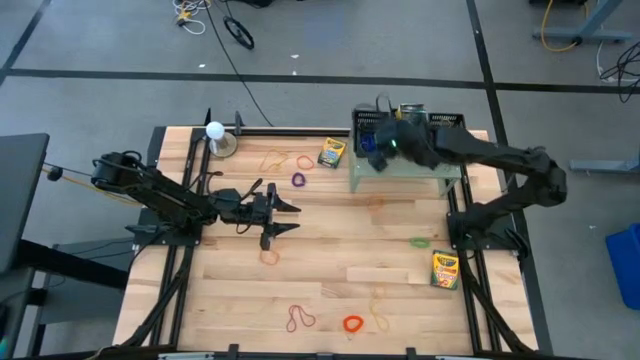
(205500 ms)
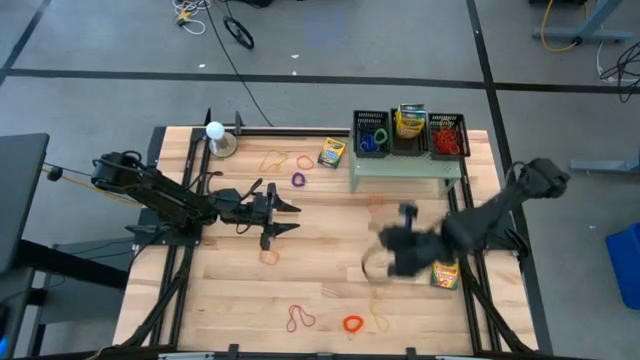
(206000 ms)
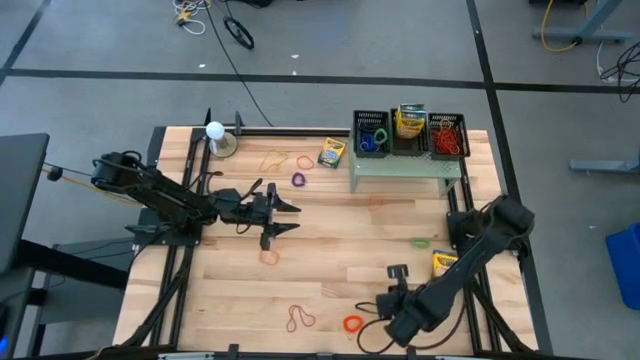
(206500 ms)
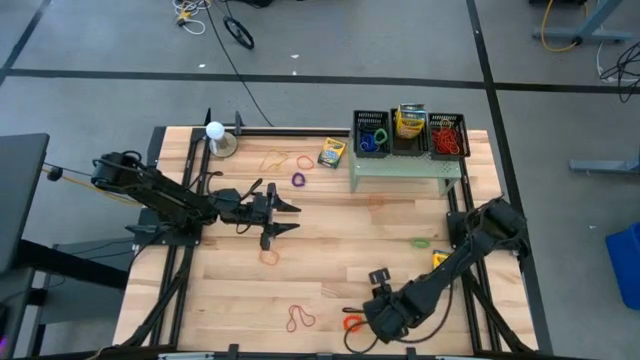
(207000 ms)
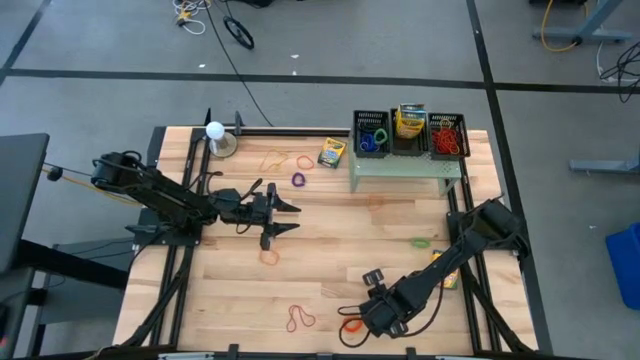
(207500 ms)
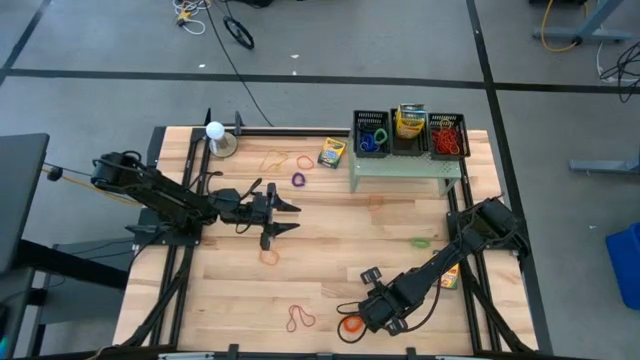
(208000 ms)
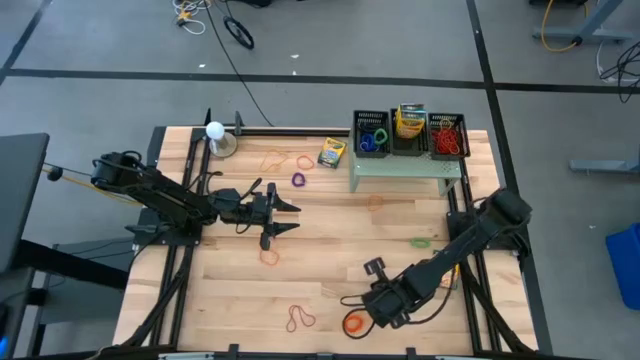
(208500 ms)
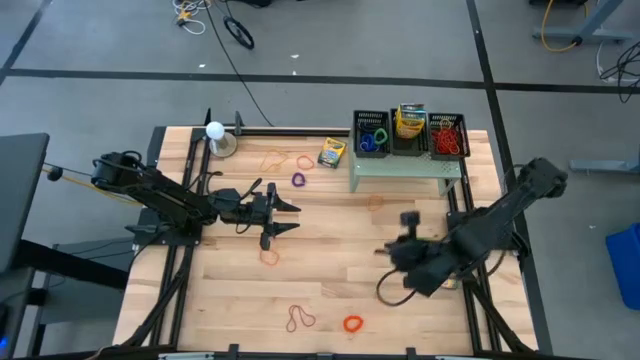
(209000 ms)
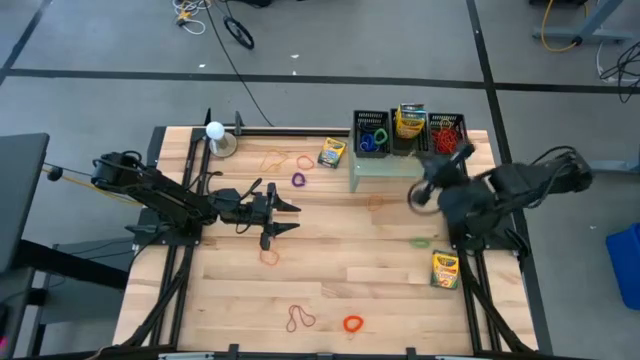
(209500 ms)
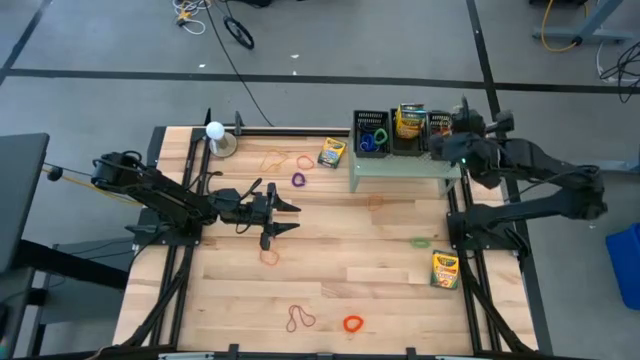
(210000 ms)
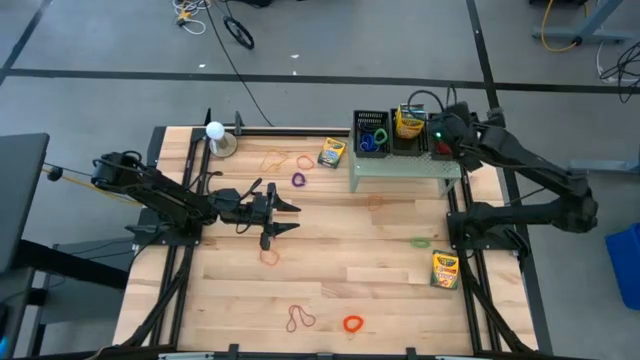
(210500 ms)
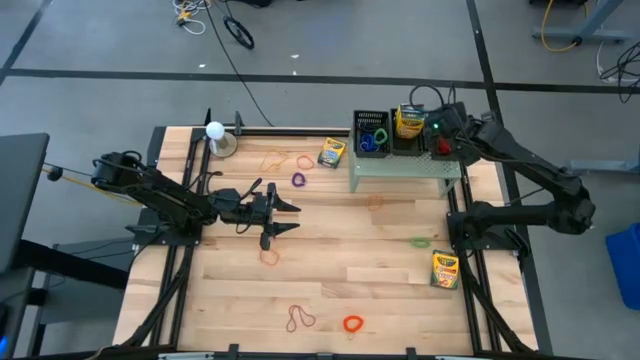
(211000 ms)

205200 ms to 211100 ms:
Task: Pick & Place Office Desk Supplies
Put the bottom yellow rubber band into the right black basket on the shelf

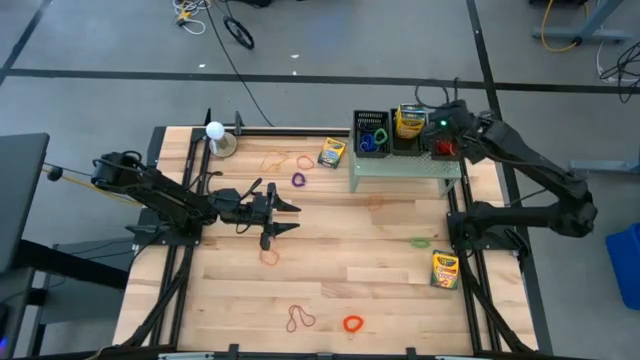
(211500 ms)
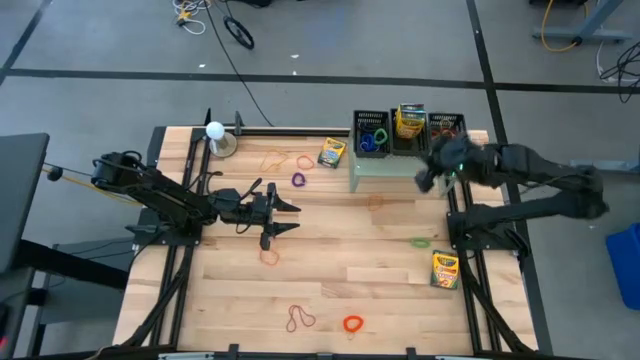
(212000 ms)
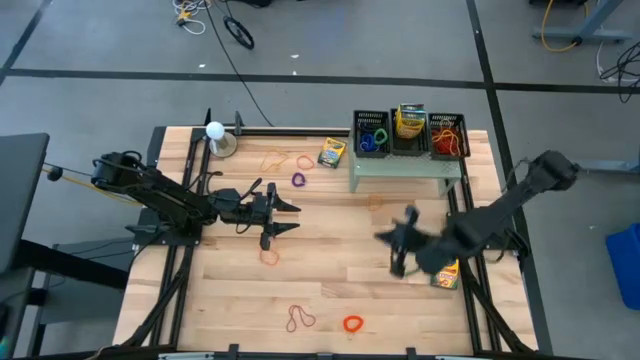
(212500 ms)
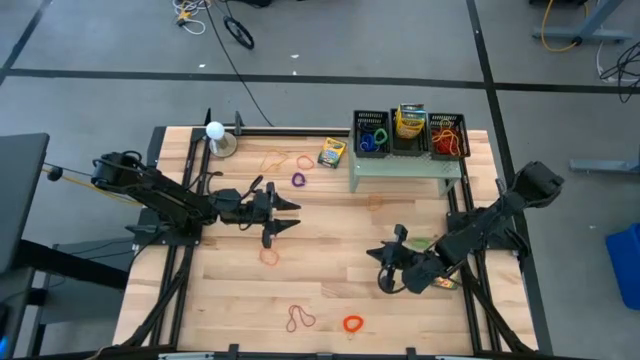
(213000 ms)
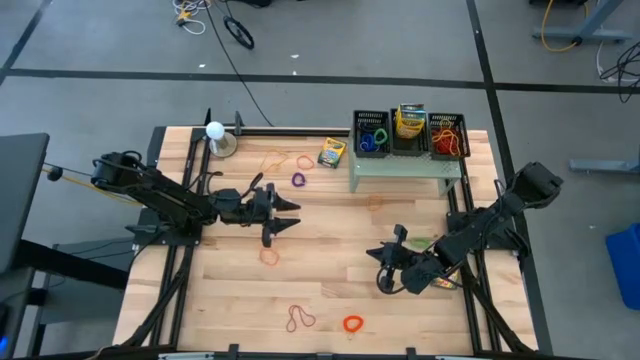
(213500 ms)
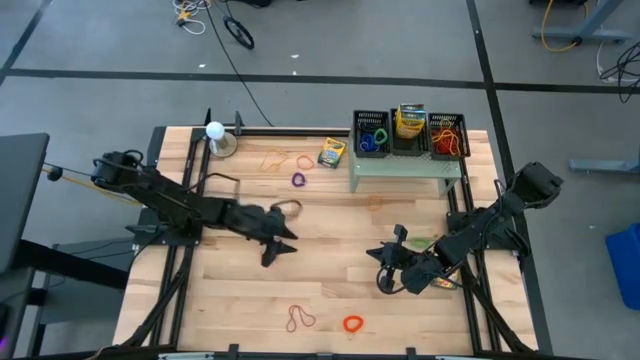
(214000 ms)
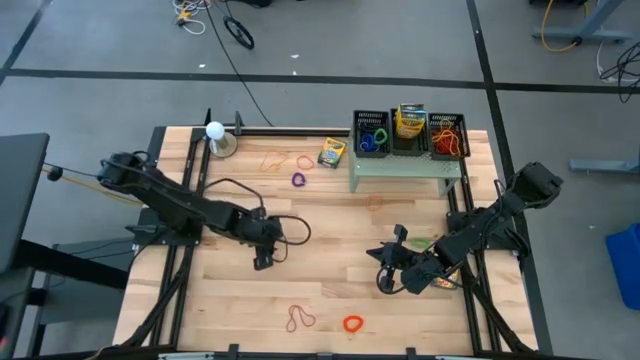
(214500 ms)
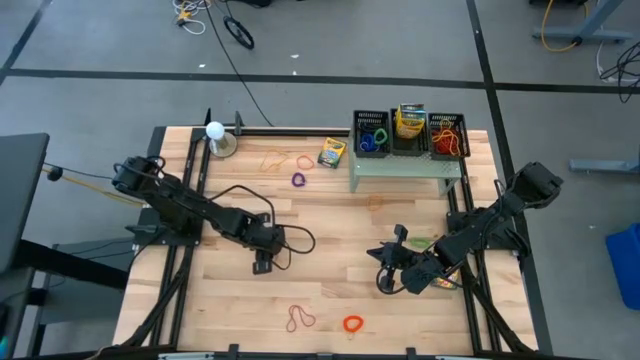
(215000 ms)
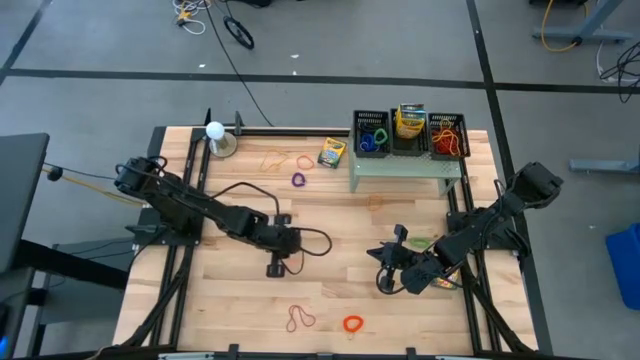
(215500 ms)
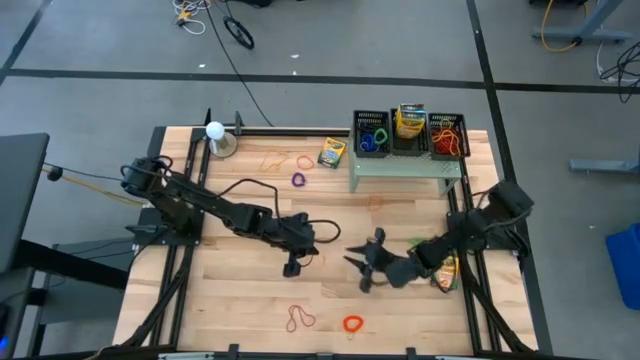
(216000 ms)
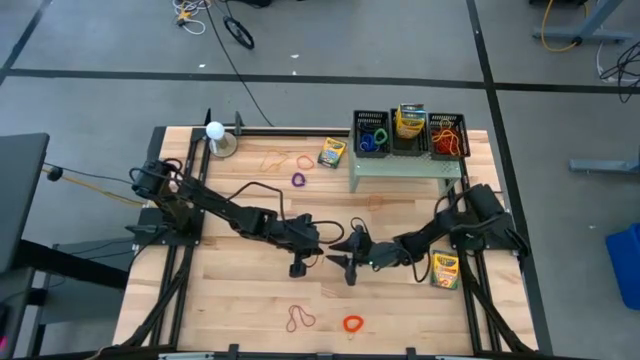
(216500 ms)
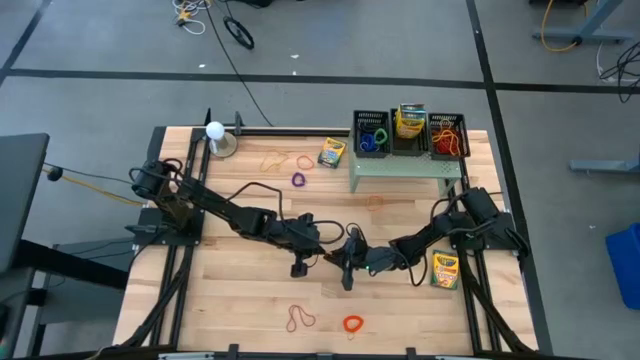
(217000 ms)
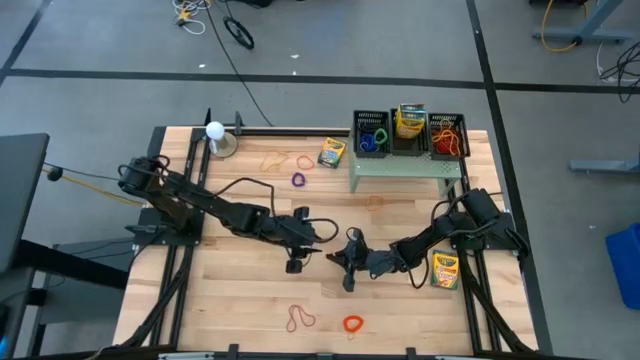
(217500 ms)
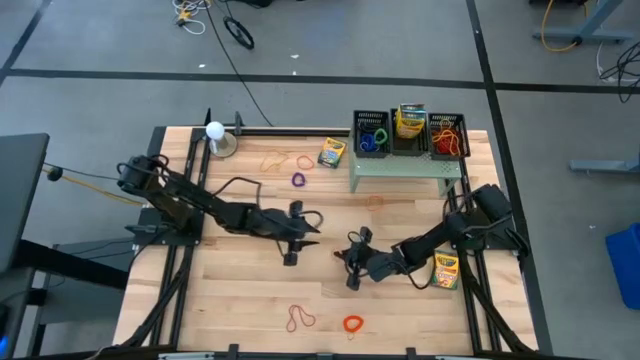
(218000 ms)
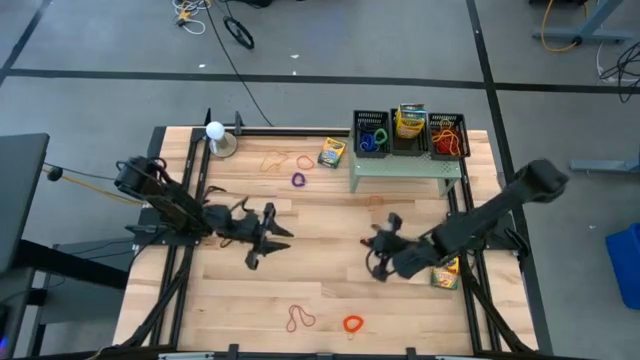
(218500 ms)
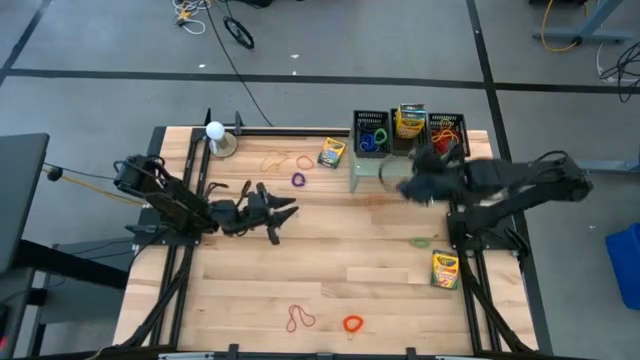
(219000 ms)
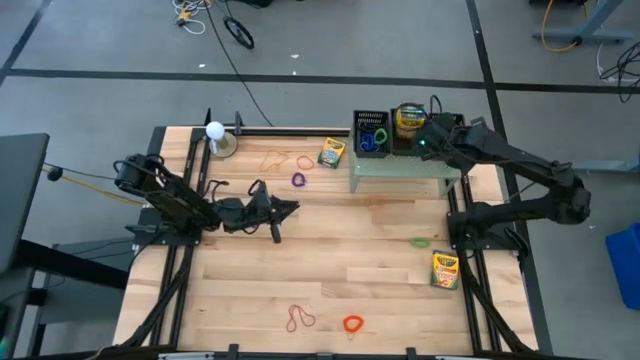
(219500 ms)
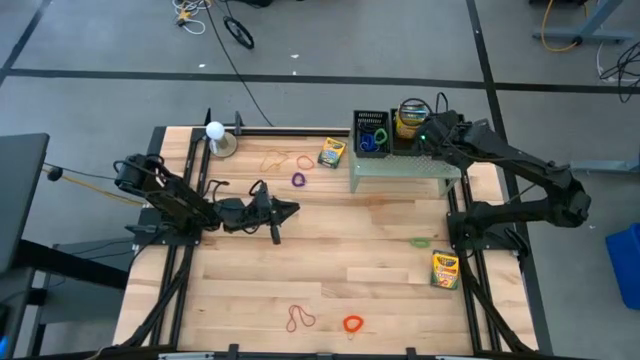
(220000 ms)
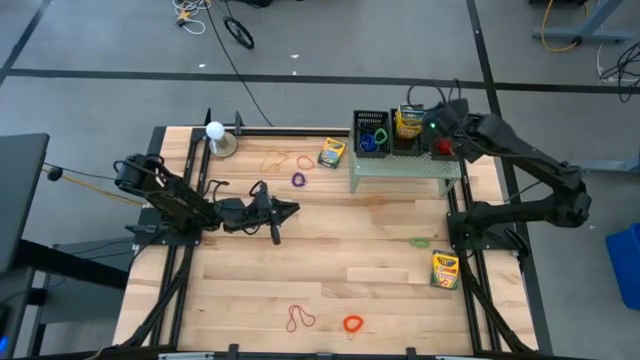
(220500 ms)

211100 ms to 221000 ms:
Put the bottom orange rubber band into the right black basket on the shelf

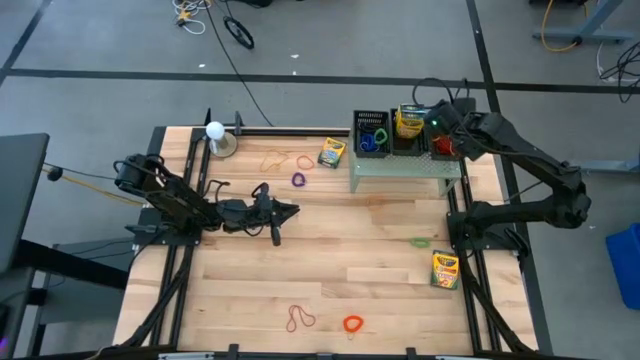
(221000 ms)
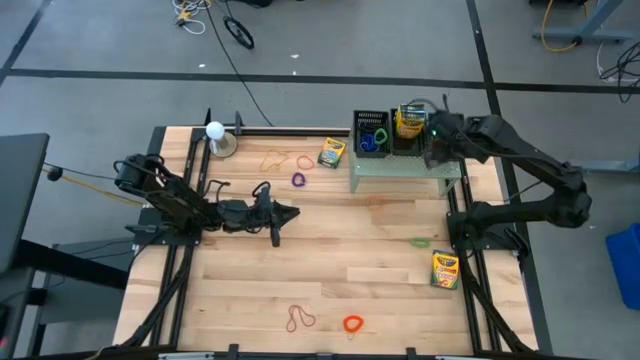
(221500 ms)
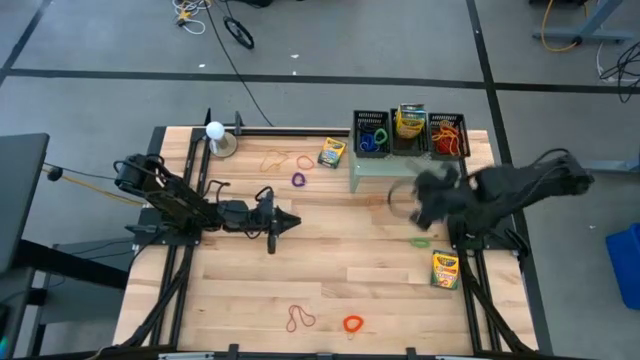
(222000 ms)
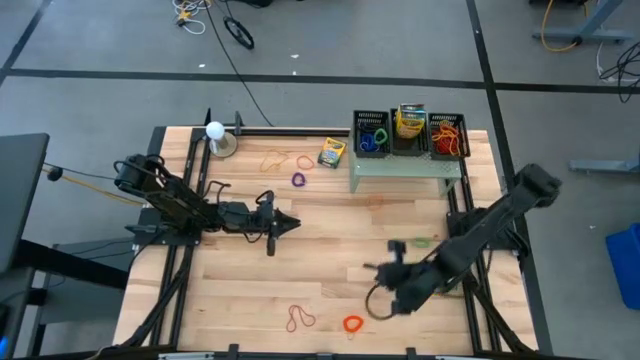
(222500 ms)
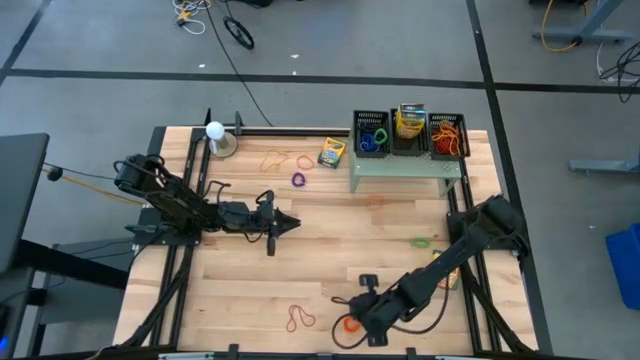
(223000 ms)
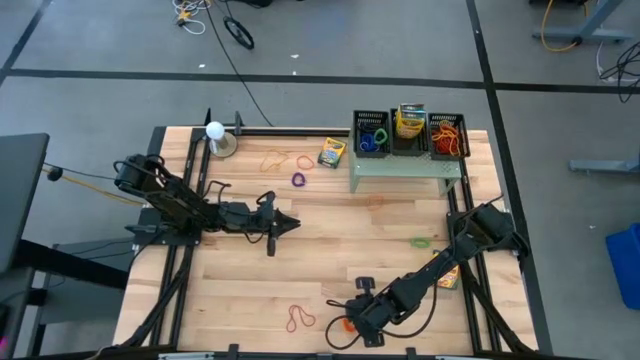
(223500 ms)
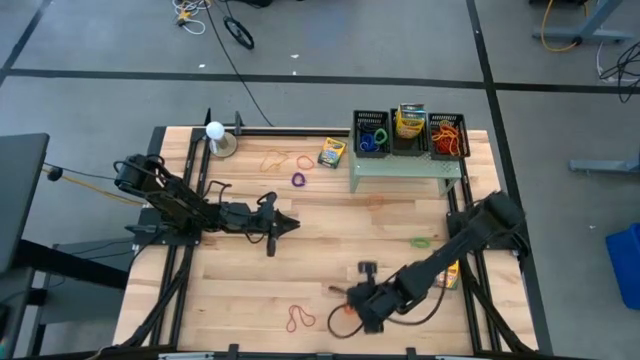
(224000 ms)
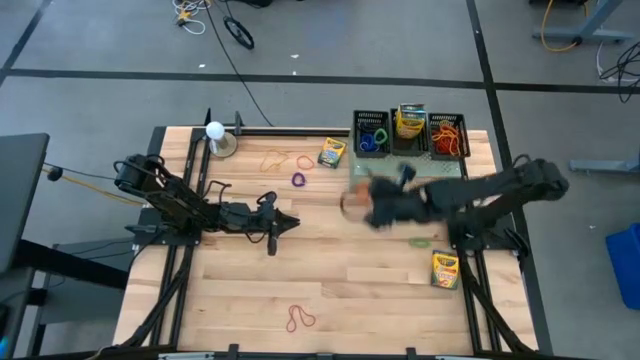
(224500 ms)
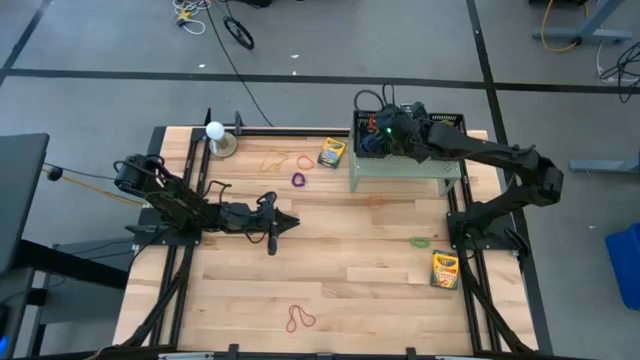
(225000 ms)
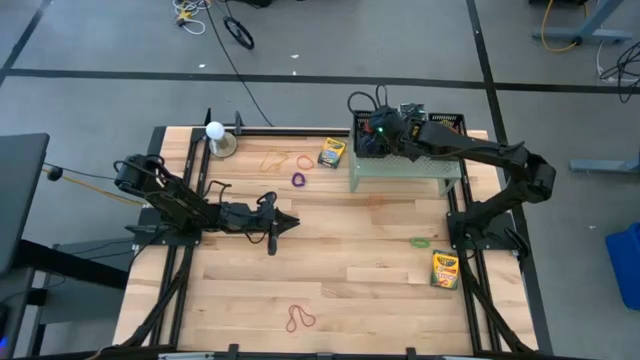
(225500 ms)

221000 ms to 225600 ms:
Put the orange spring keychain into the left black basket on the shelf

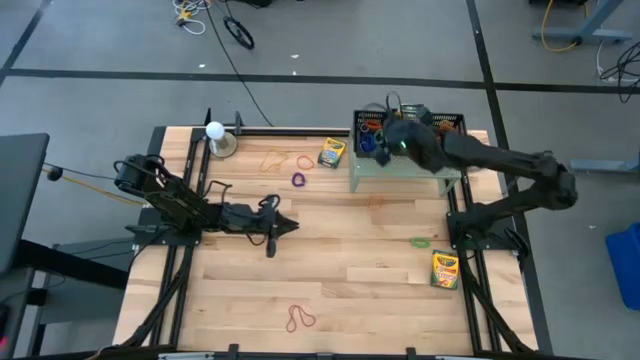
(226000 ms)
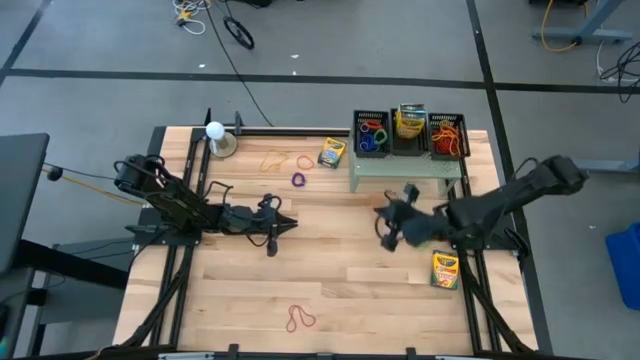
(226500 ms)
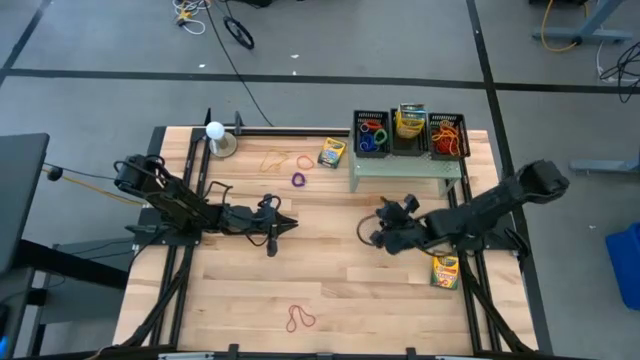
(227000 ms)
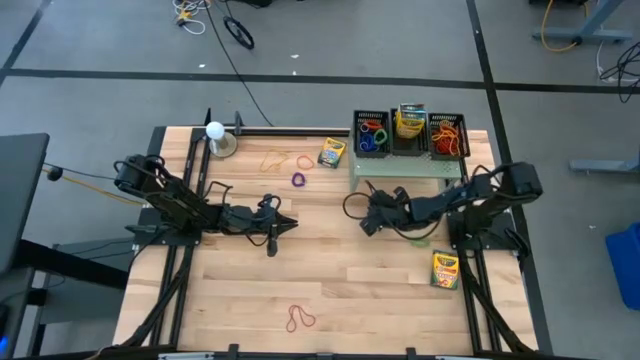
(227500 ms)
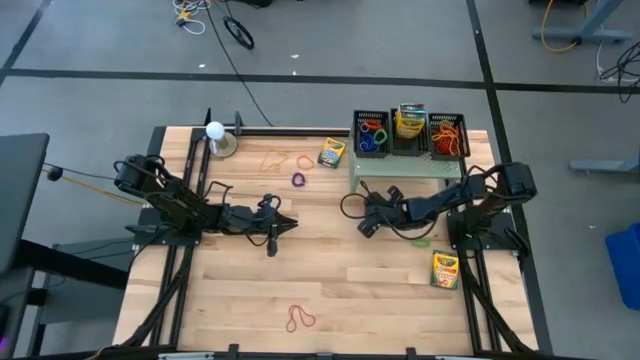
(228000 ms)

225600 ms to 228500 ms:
Put the right orange rubber band into the right black basket on the shelf
